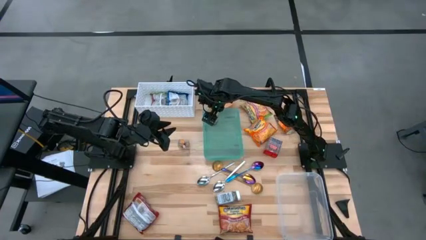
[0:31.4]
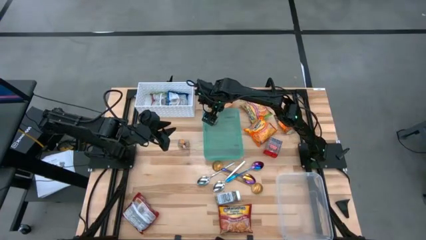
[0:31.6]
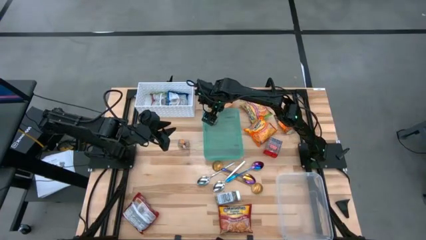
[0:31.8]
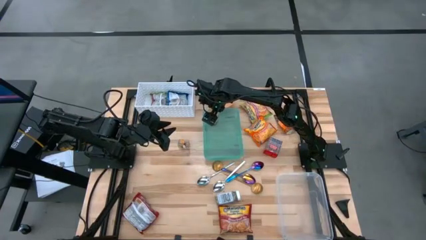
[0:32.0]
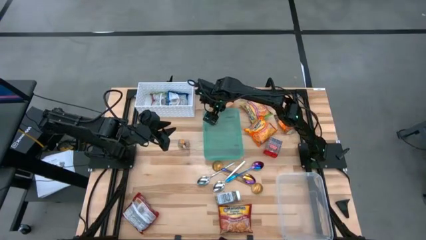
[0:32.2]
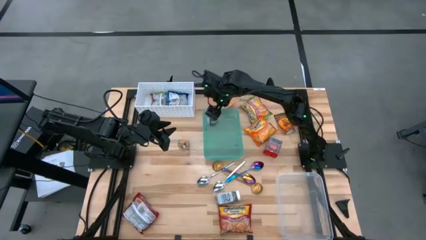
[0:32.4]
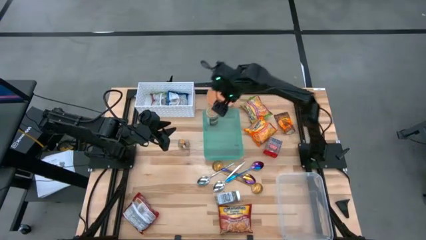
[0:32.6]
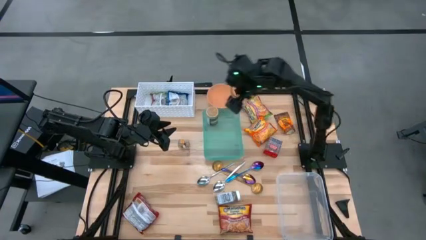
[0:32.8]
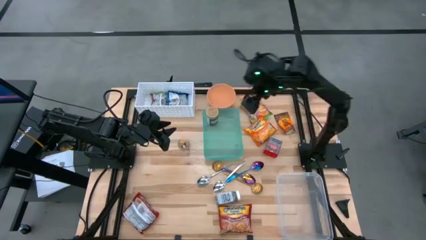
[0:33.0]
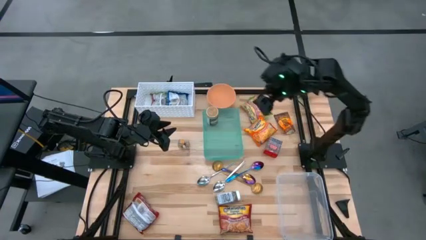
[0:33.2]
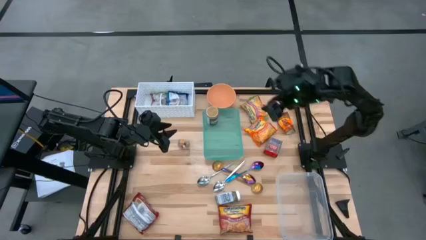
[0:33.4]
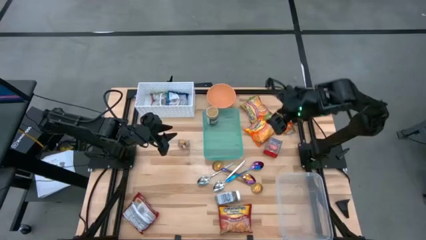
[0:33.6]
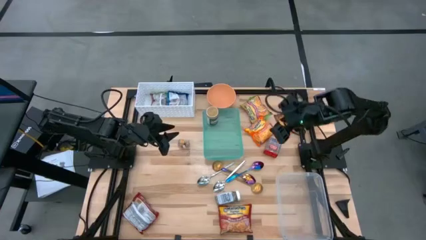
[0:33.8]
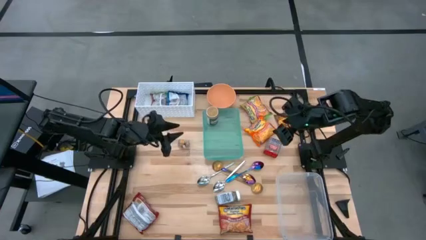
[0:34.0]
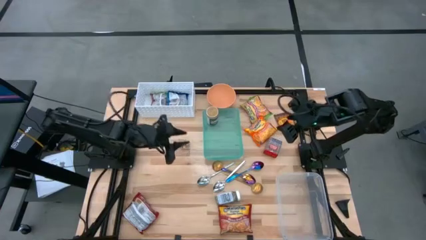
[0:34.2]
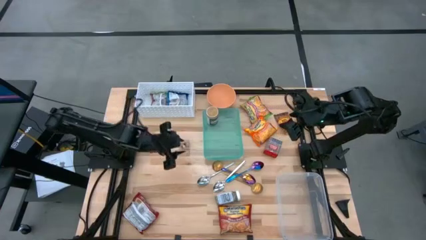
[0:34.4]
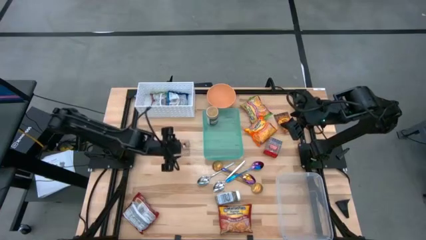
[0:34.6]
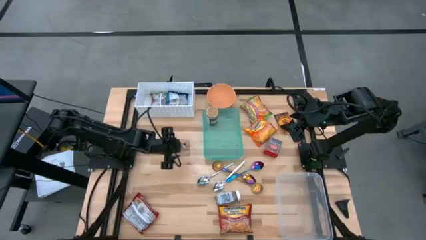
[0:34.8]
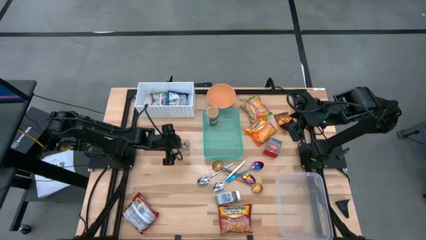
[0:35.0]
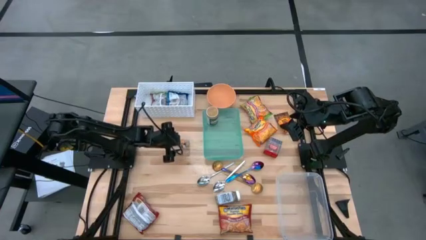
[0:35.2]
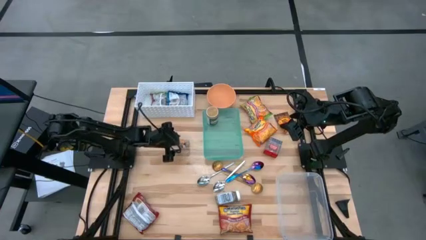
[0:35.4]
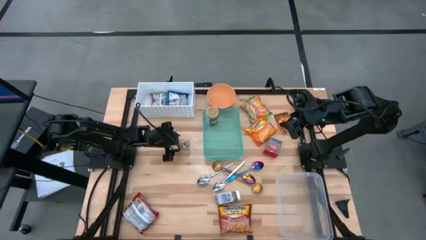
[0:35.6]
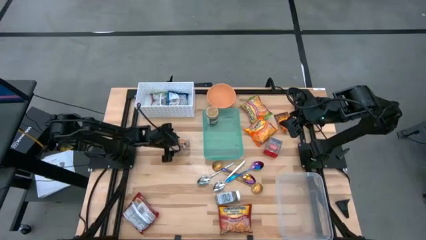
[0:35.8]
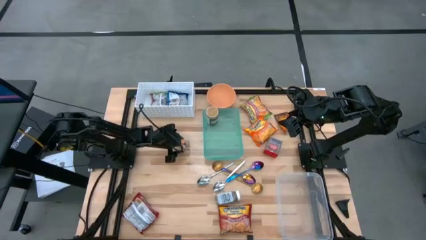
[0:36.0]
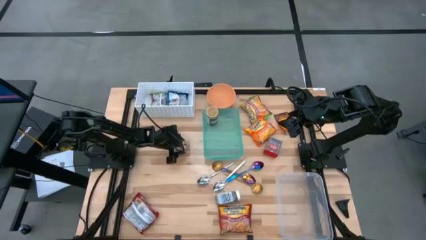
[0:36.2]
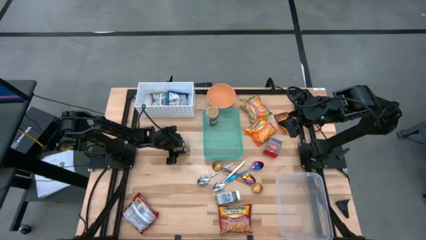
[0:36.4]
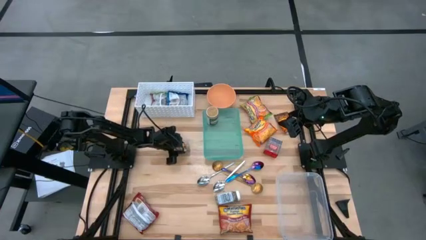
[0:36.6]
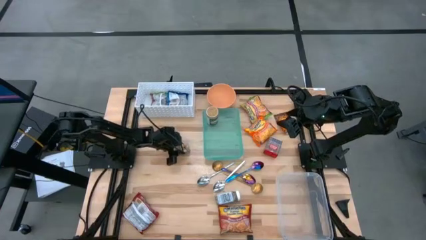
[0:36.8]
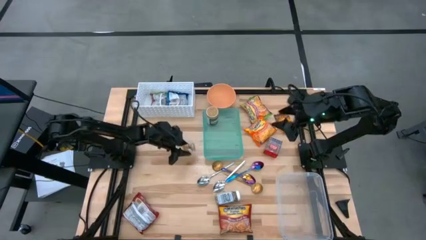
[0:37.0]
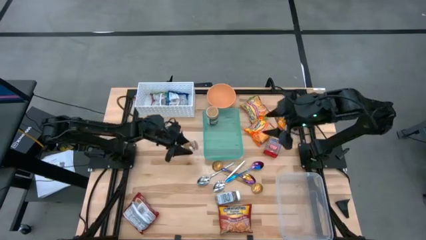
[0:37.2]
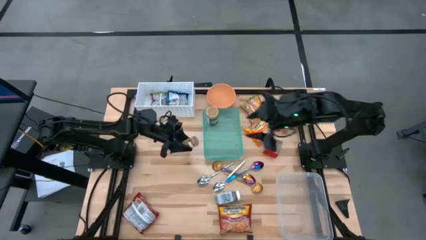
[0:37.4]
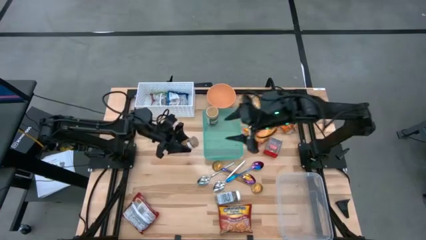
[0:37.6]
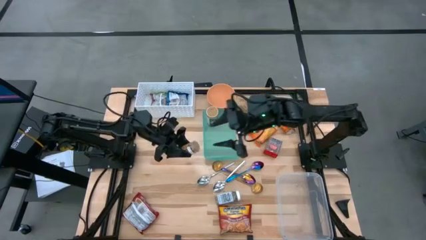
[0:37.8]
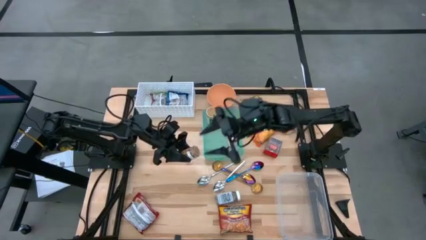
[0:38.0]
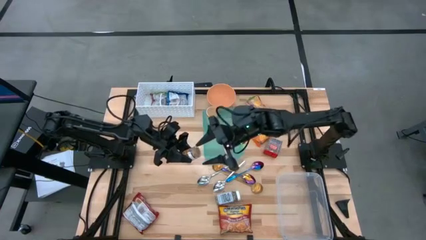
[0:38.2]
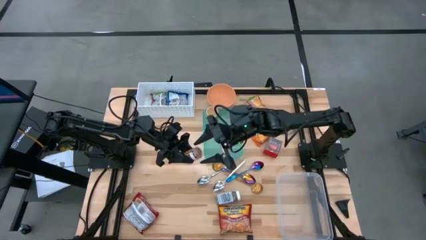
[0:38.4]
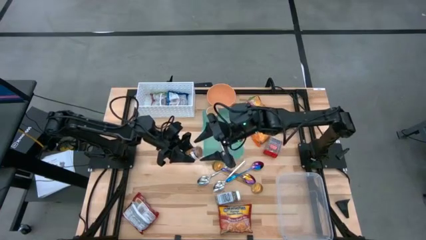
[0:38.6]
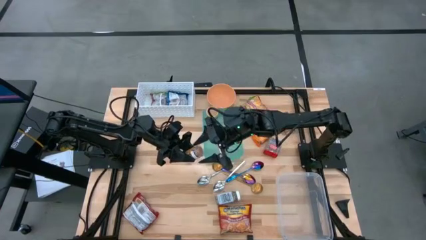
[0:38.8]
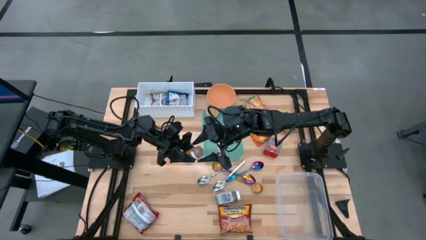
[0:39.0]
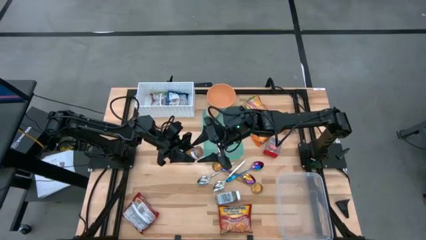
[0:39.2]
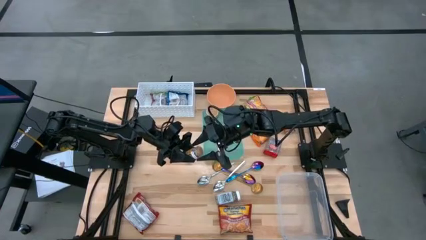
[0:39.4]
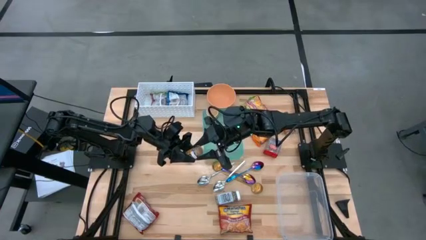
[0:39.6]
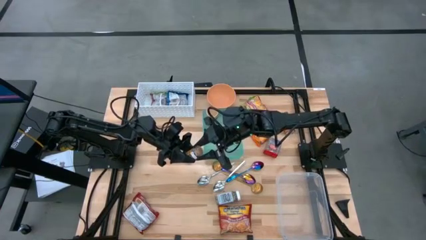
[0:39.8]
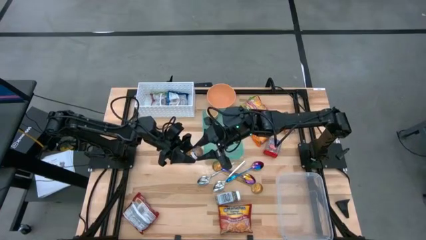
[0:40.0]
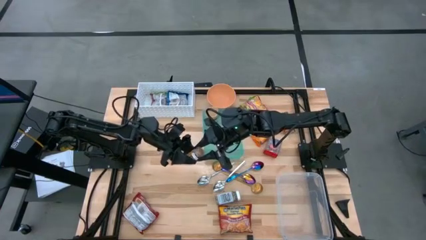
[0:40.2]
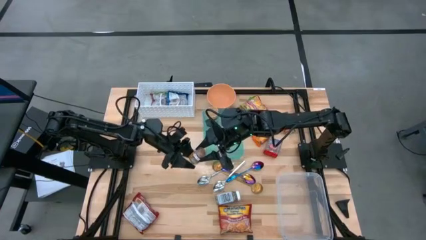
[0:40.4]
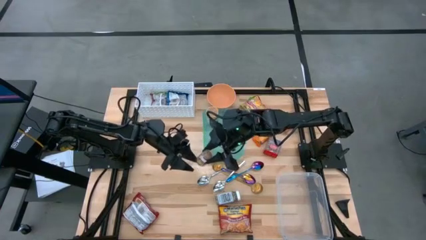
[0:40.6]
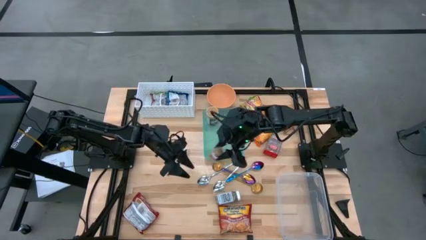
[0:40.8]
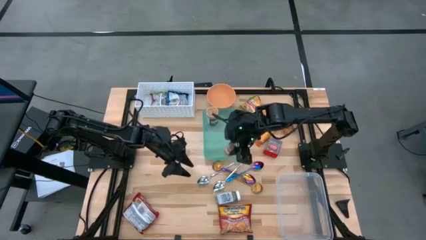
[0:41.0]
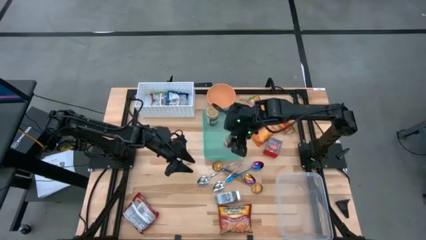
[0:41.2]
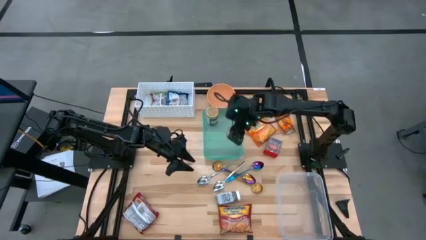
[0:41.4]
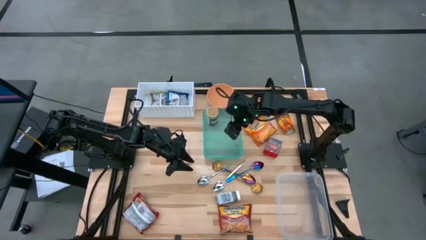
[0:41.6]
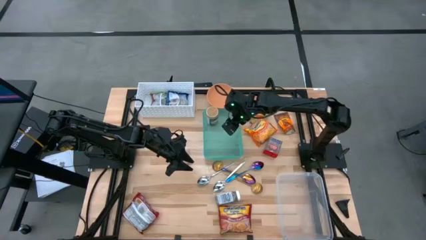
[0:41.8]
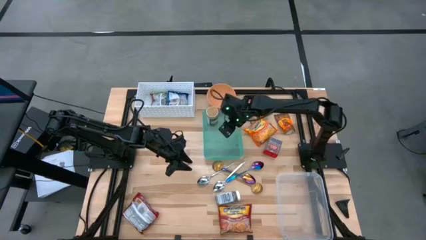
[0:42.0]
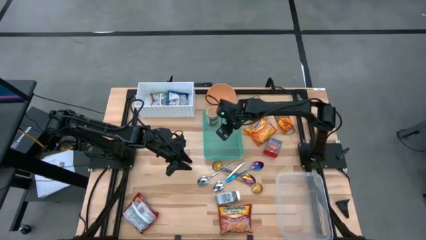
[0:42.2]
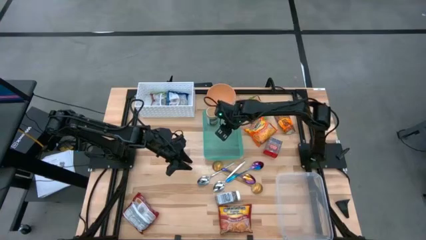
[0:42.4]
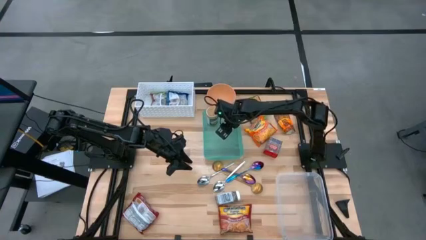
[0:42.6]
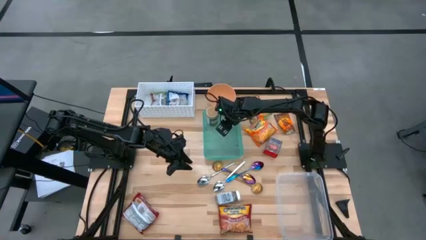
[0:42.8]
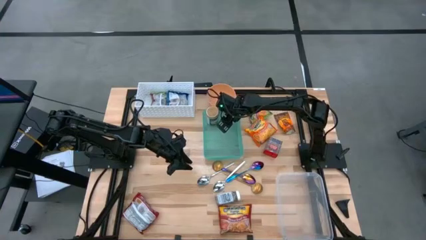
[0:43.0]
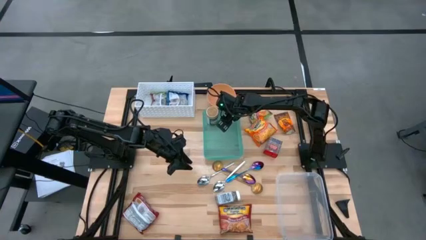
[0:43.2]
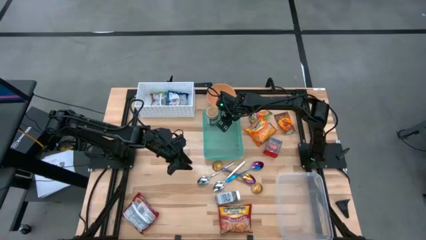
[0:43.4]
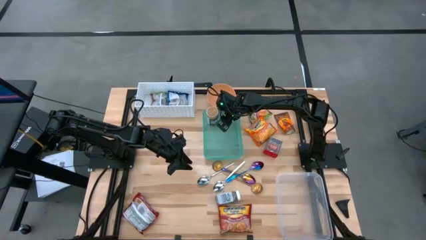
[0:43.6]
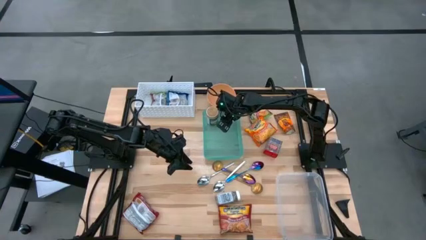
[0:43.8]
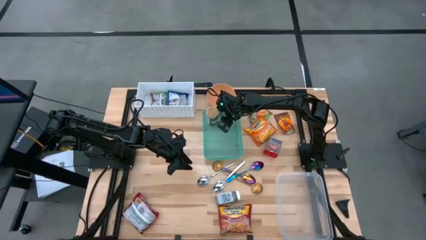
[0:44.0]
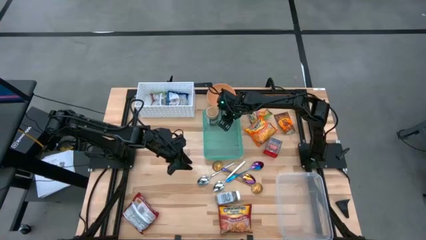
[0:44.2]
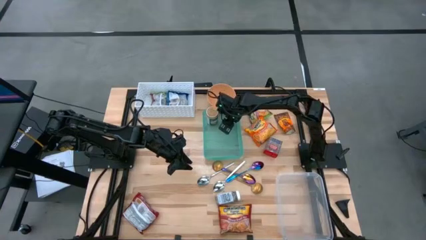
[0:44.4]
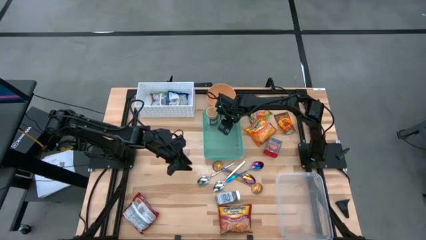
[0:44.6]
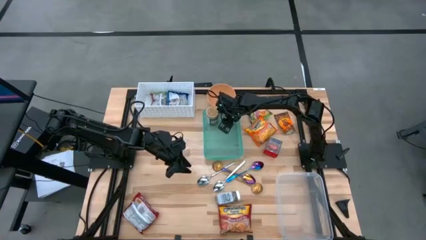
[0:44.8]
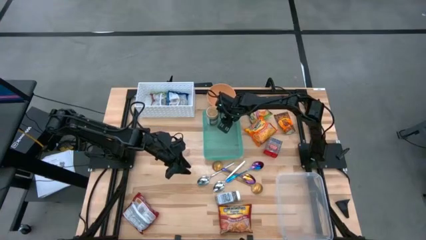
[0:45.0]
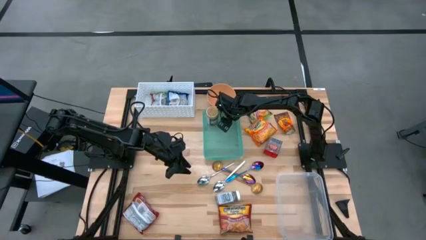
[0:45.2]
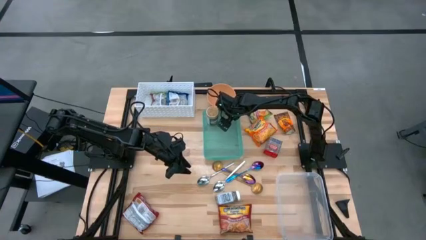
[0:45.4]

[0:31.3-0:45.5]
Task: Pick & Place Food Item
Put the brown seasoning into the blue bin
